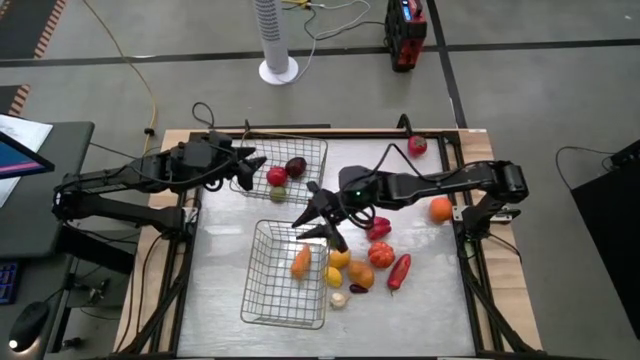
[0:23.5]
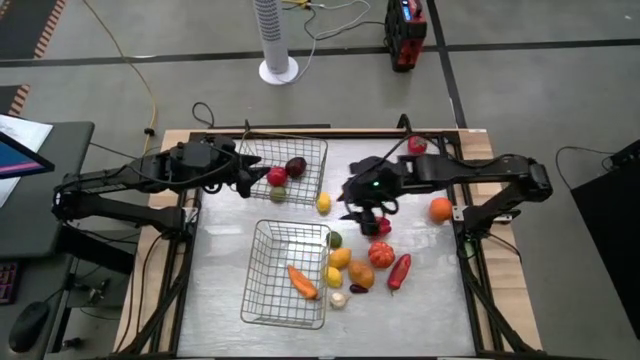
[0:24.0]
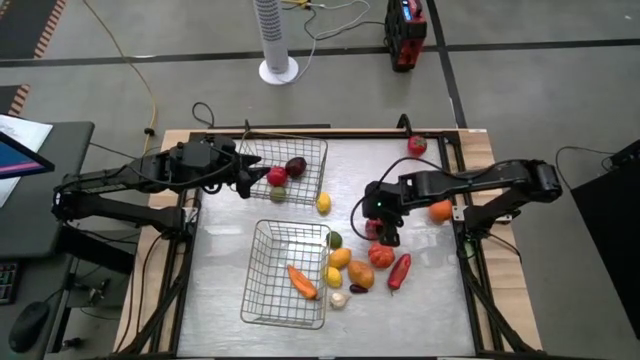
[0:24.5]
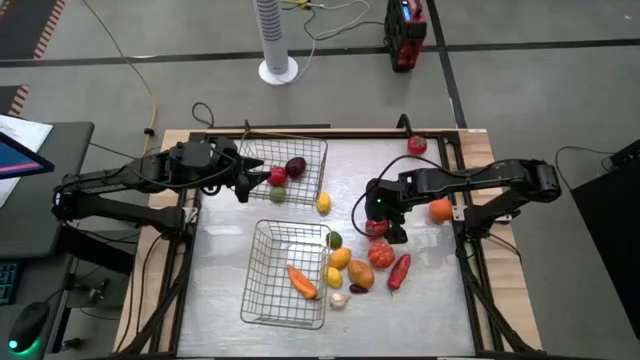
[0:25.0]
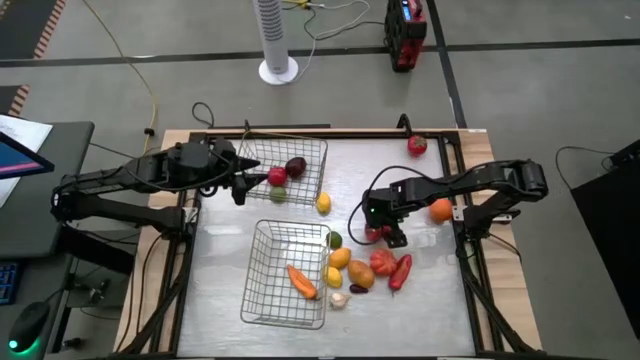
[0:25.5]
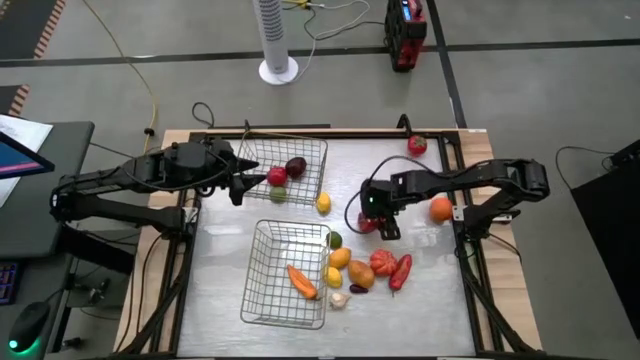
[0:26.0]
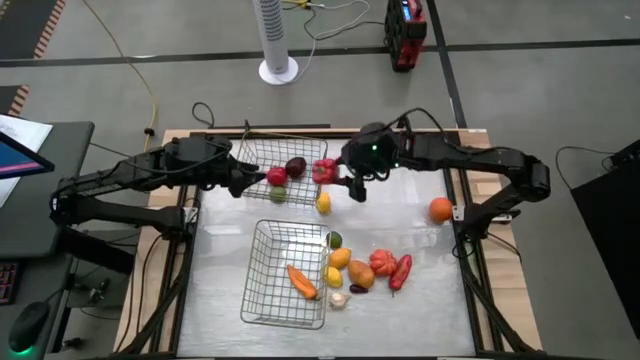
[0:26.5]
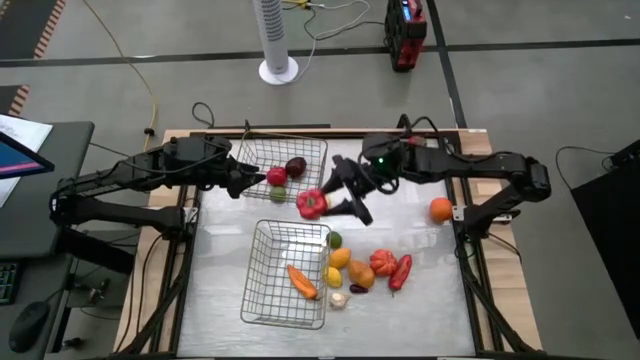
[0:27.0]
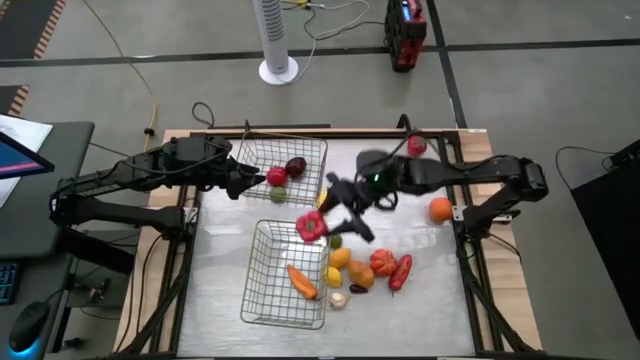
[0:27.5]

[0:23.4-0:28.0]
Task: Sort produce into baskets
Put the red bell pepper into the bottom wire basket

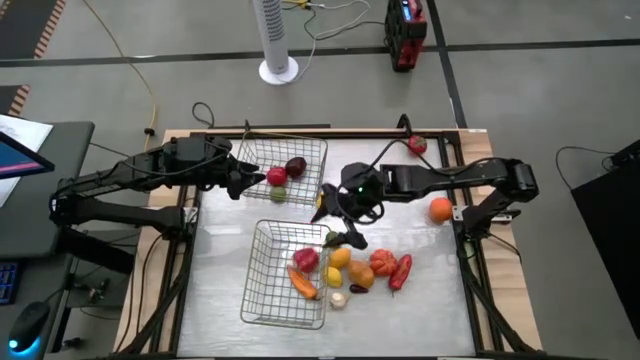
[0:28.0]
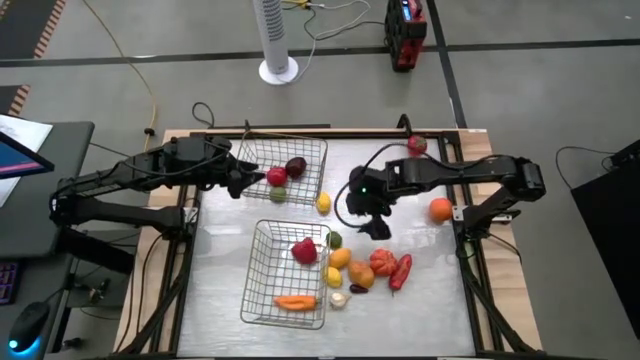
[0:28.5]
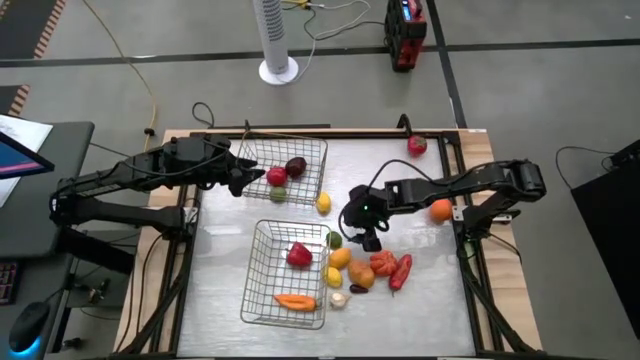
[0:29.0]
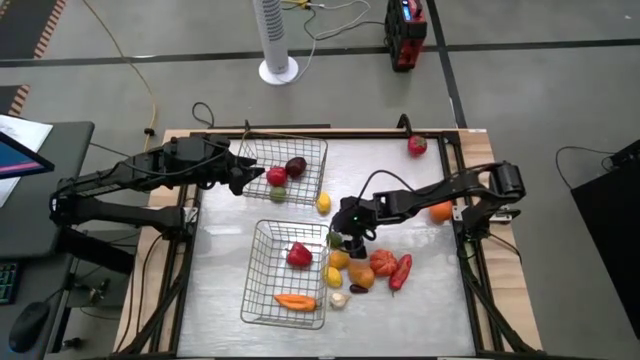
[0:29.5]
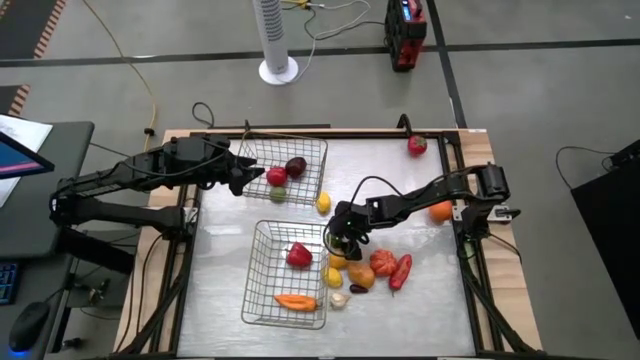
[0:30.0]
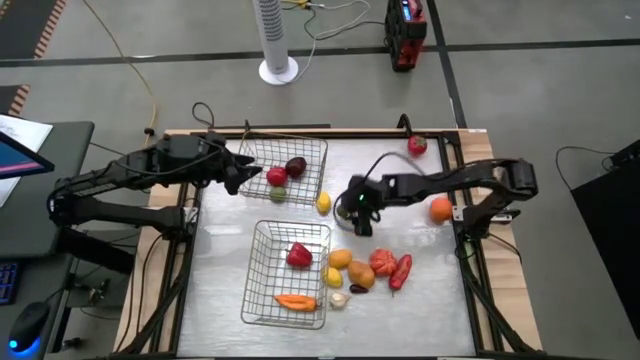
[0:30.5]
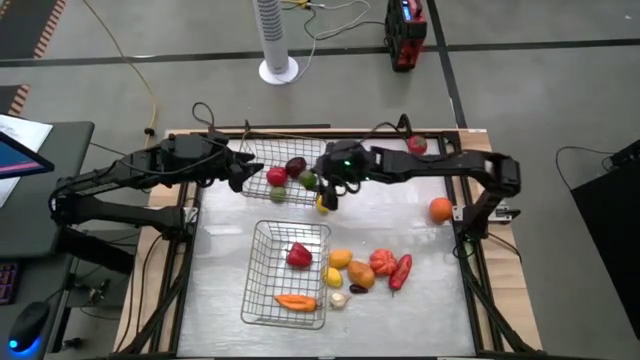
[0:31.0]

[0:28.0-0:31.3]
Put the lime into the top wire basket

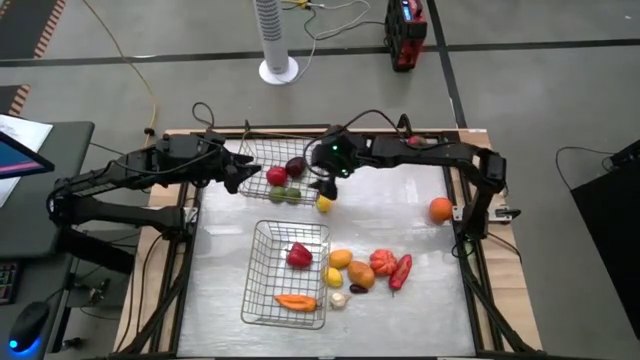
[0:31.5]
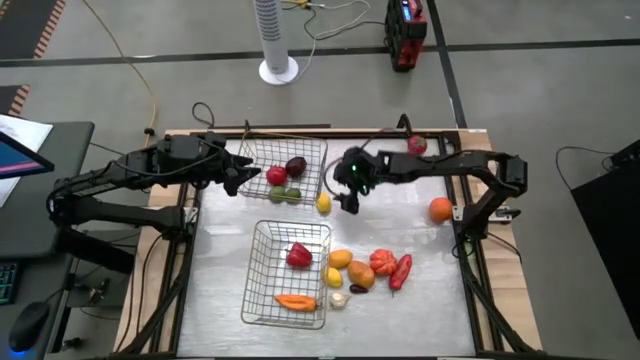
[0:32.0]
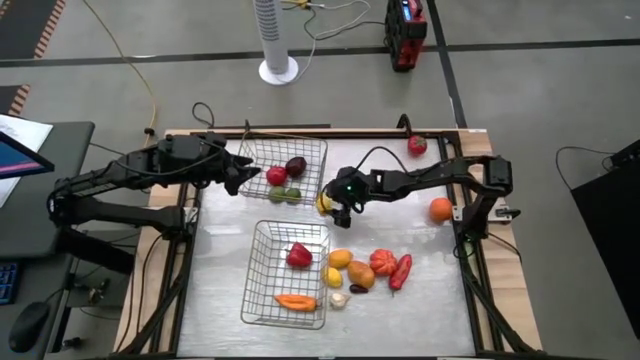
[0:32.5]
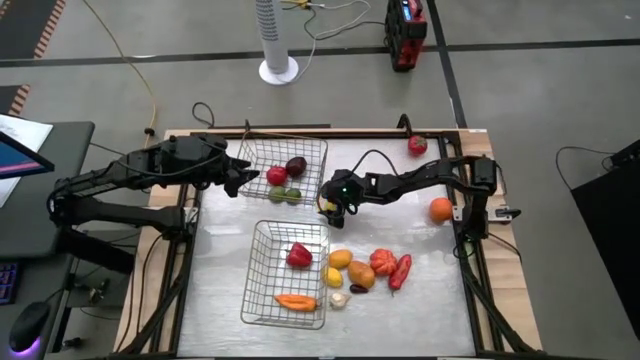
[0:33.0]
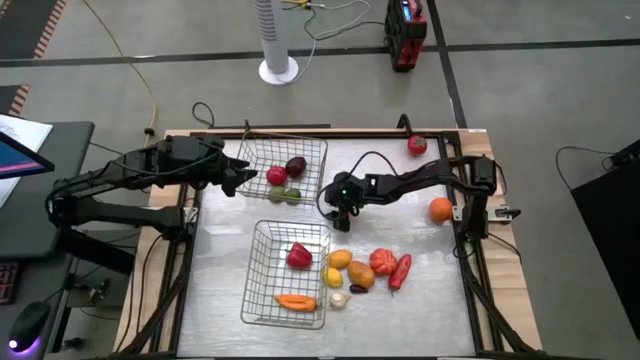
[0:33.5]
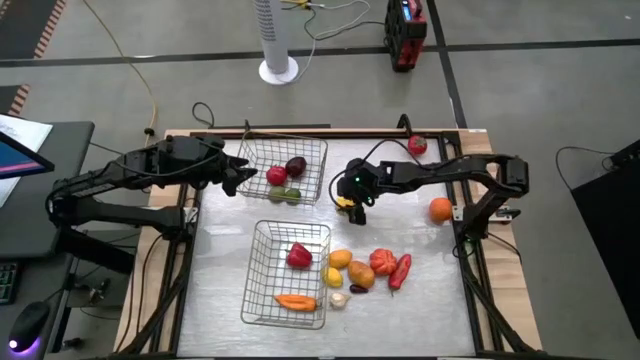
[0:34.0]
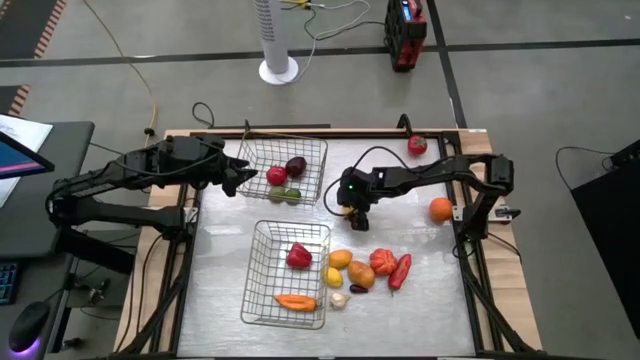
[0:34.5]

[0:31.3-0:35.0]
Put the top lemon into the top wire basket

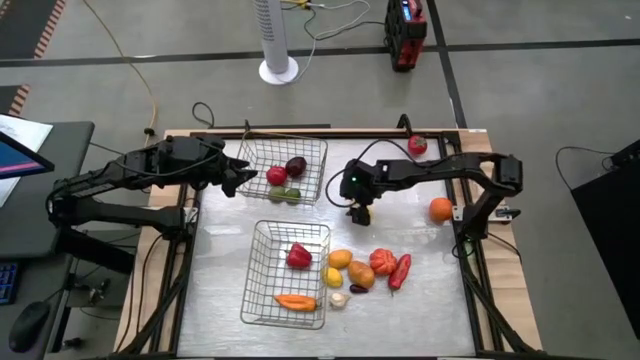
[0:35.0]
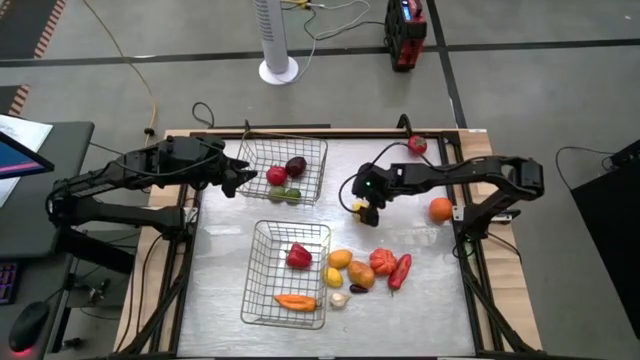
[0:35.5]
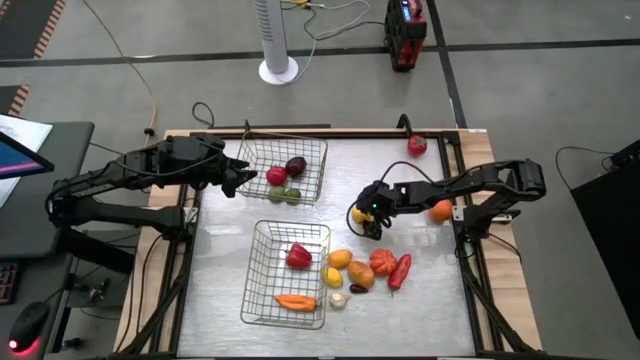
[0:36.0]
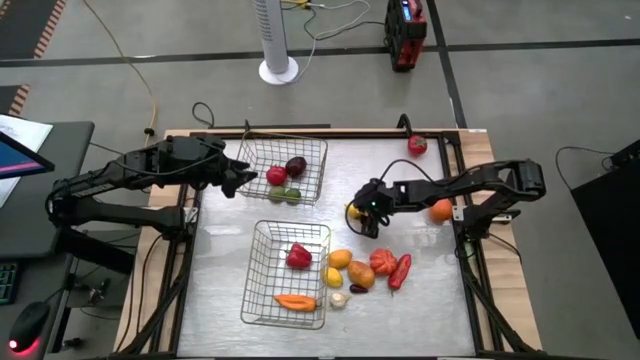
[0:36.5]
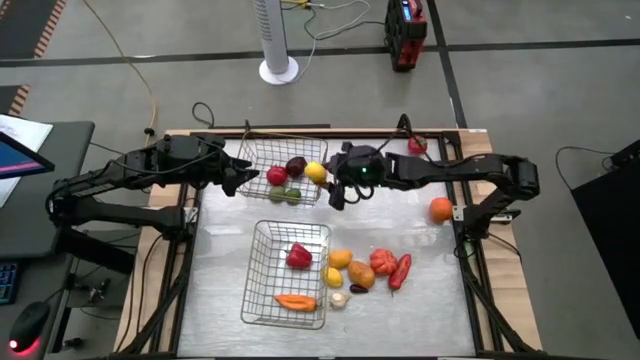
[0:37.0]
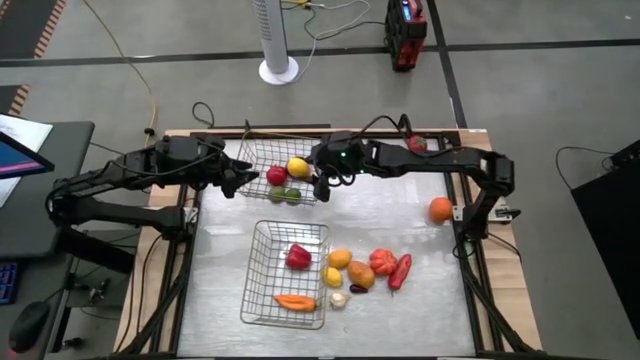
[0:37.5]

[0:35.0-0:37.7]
Put the top lemon into the top wire basket

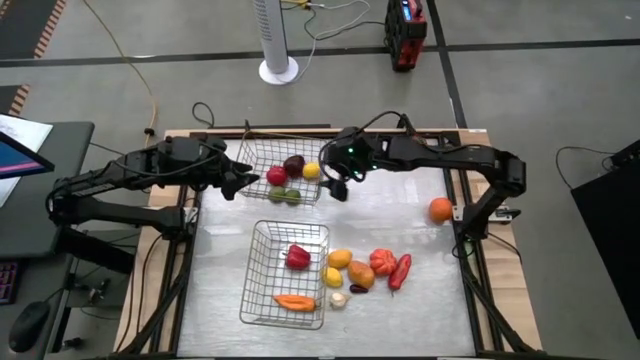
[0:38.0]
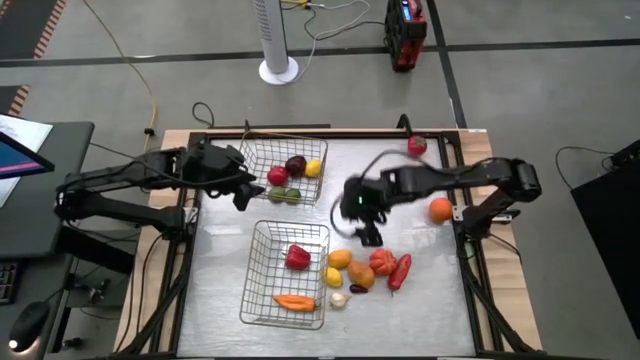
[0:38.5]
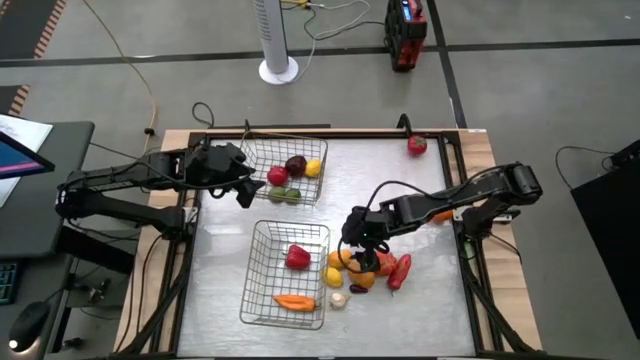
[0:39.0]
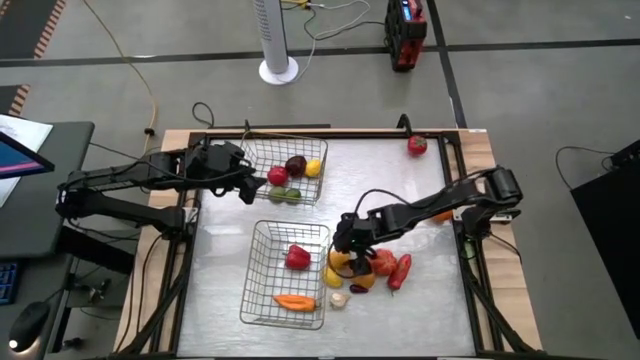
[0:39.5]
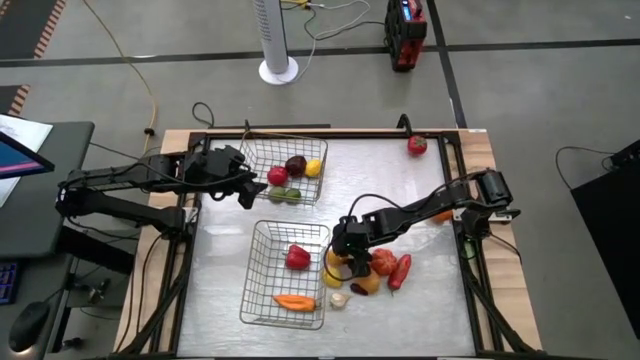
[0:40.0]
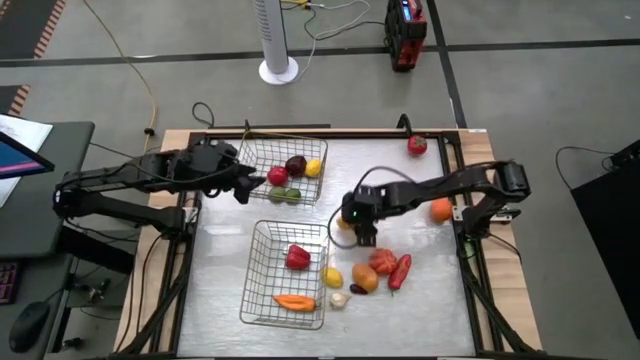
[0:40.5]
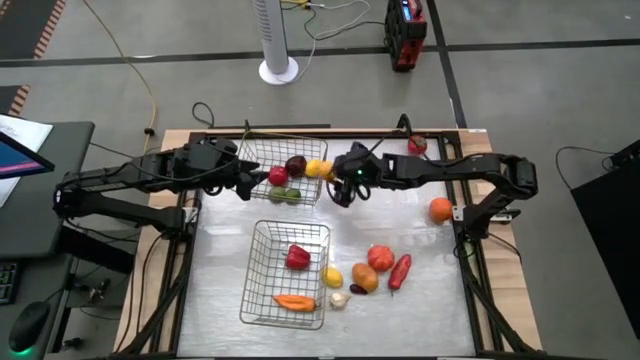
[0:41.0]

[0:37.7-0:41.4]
Put the top lemon into the top wire basket

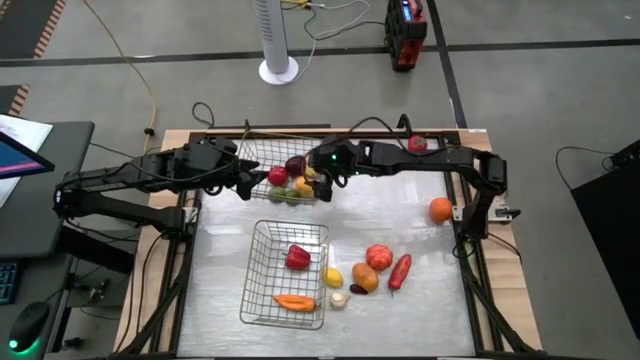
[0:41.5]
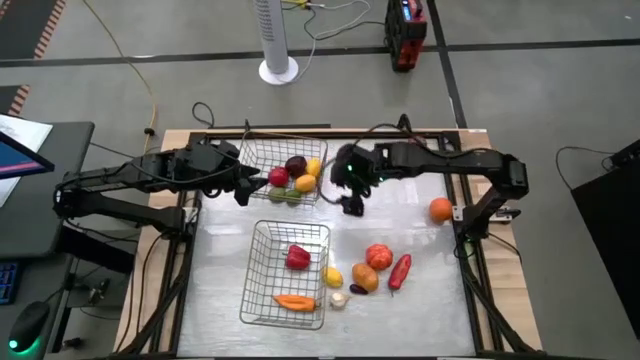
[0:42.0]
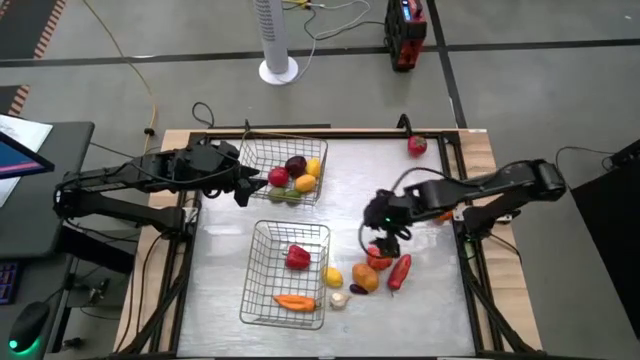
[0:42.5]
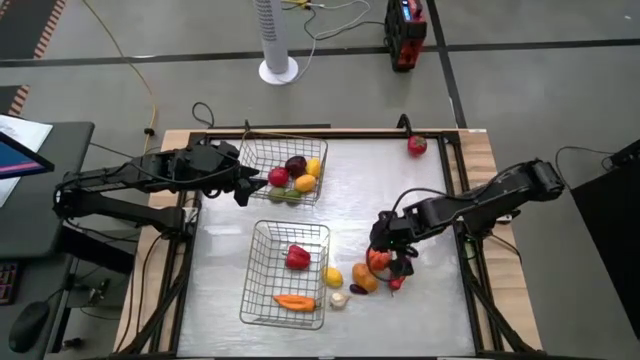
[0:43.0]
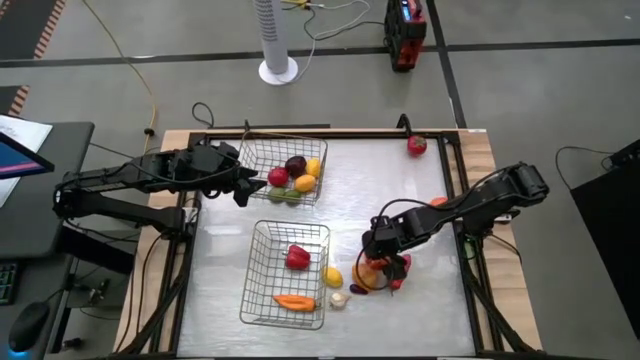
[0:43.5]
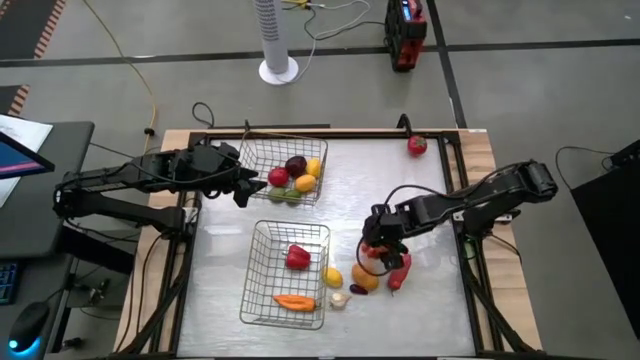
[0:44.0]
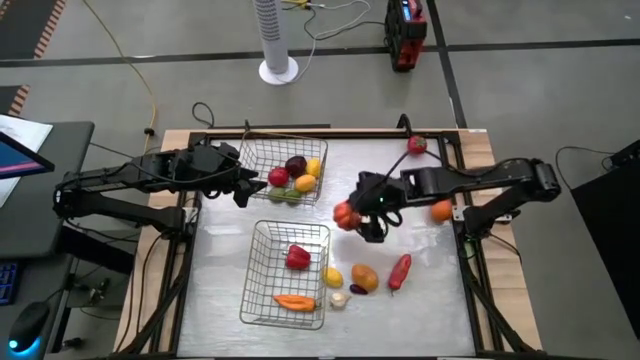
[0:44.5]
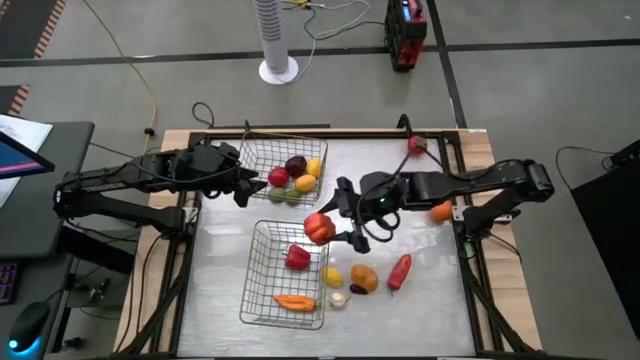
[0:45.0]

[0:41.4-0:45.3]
Put the pumpkin into the bottom wire basket
